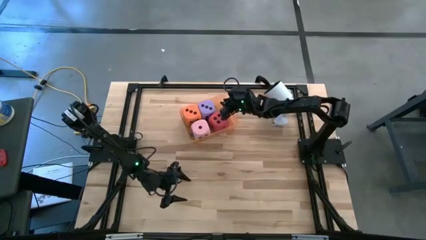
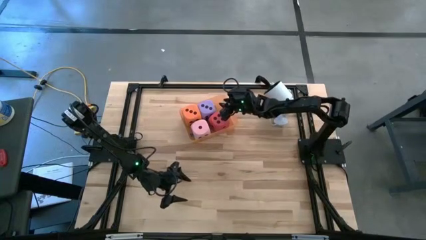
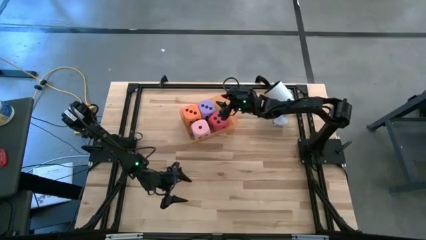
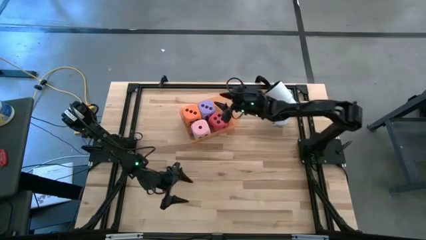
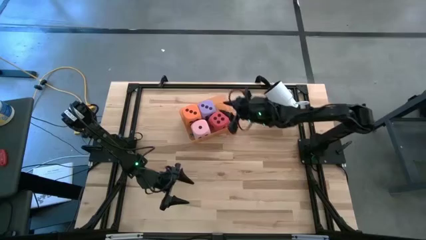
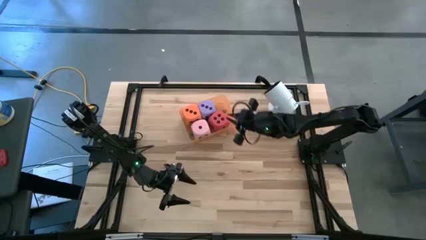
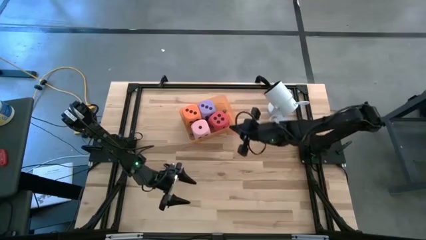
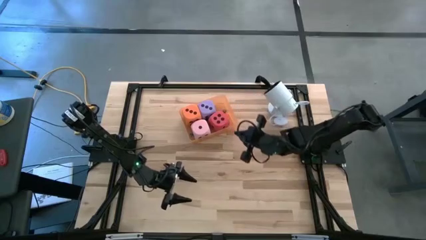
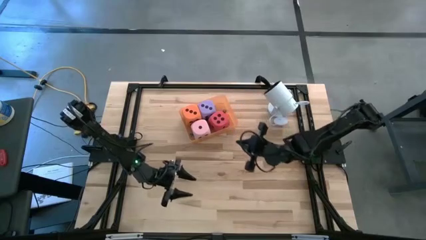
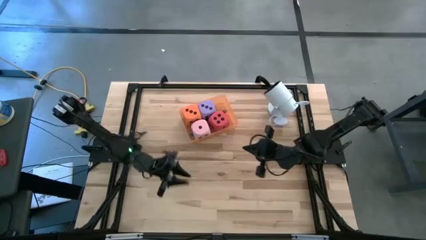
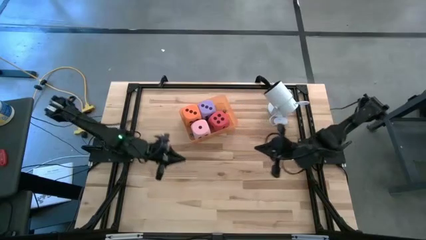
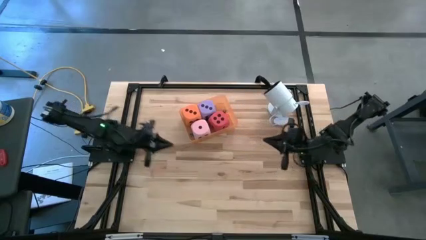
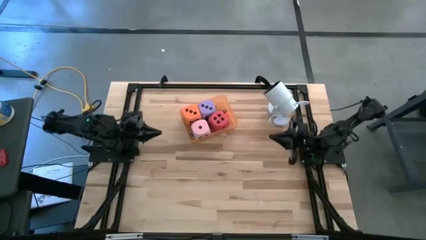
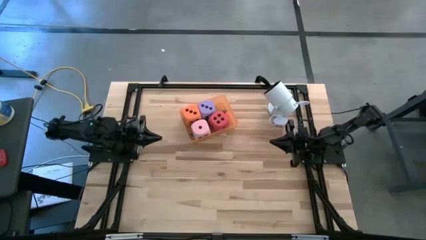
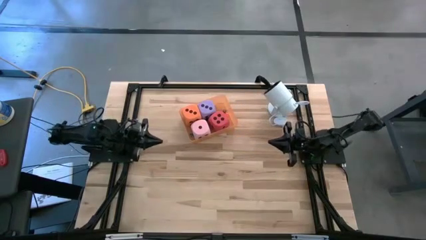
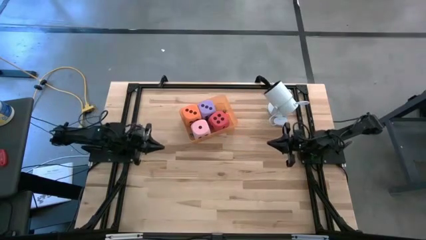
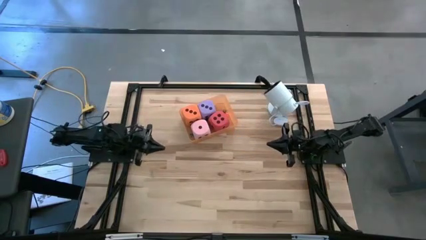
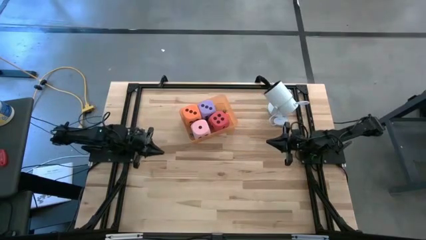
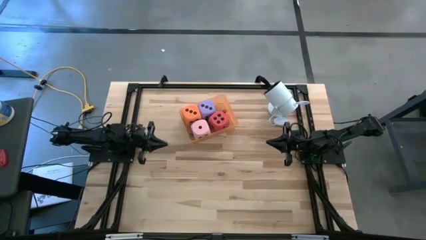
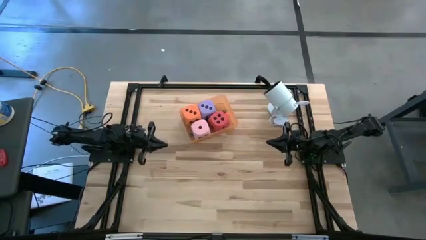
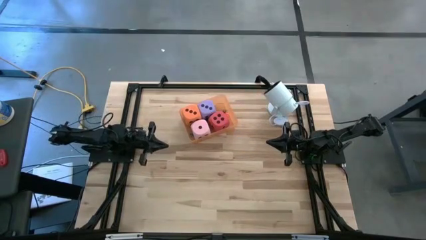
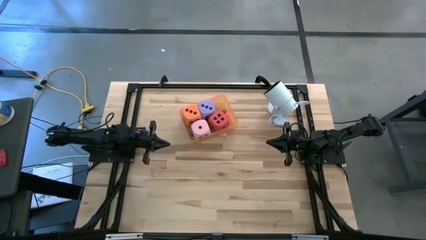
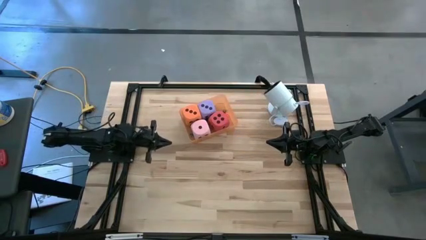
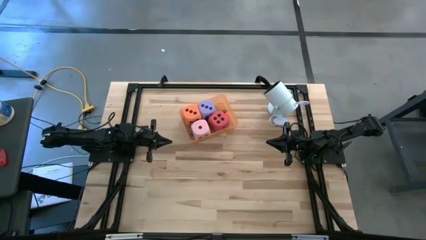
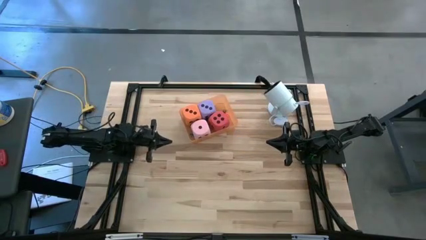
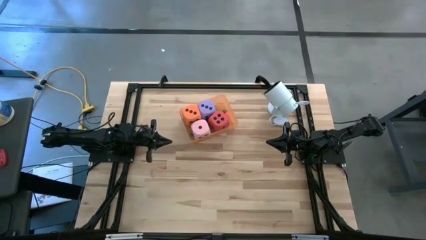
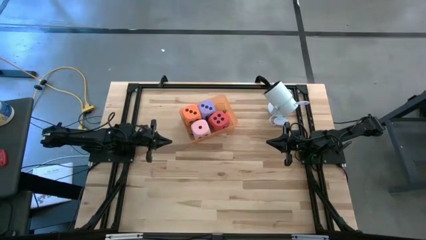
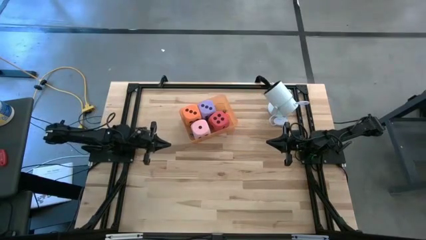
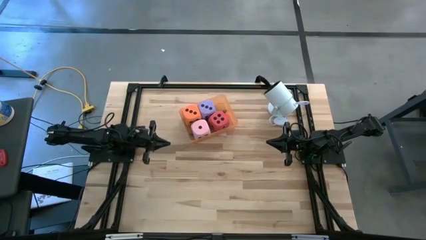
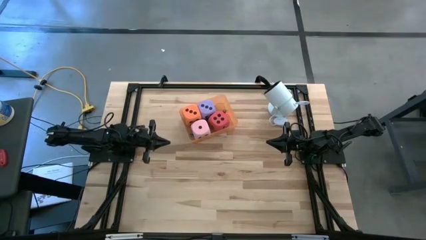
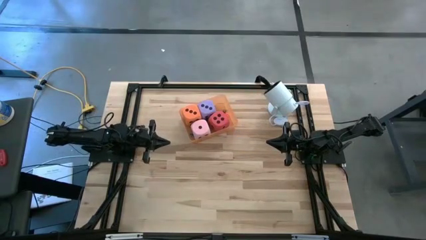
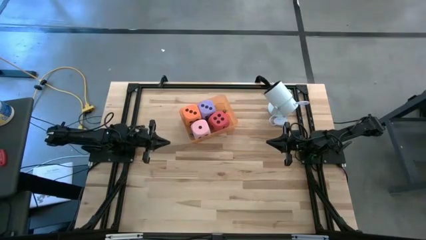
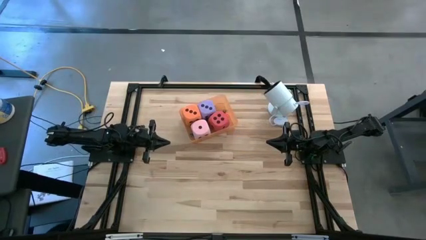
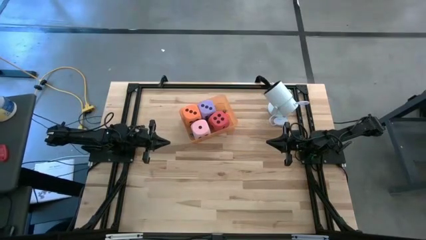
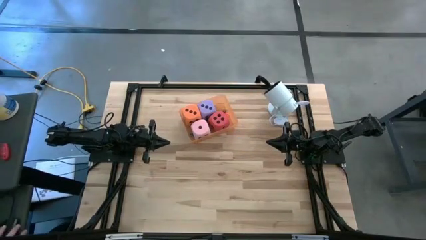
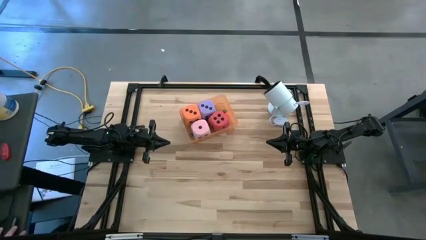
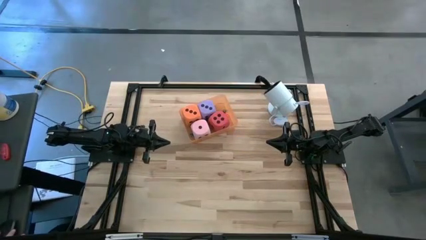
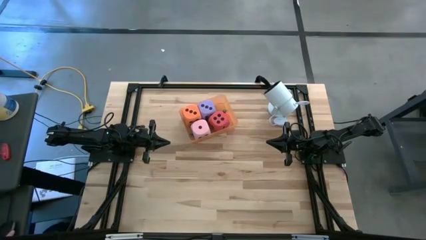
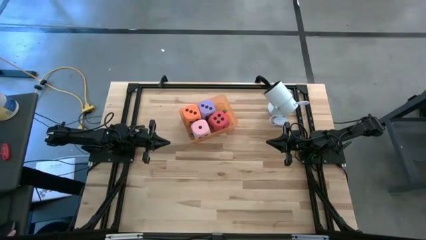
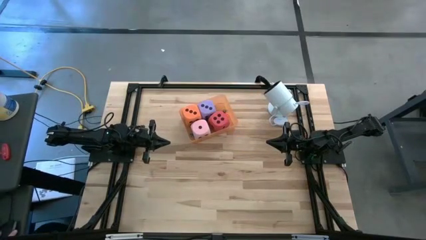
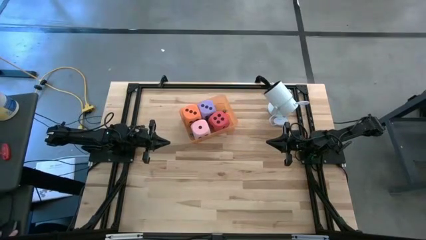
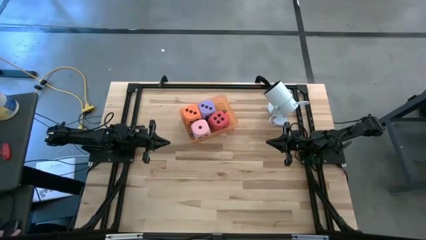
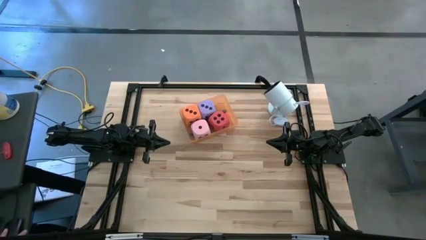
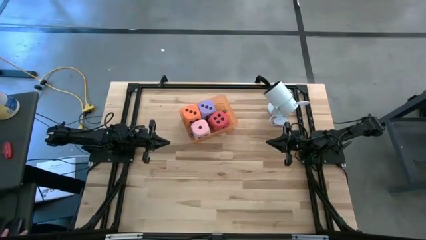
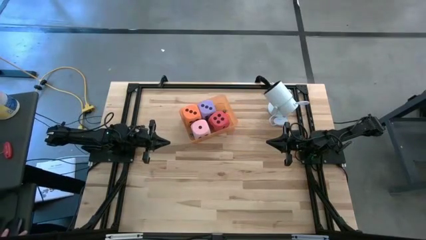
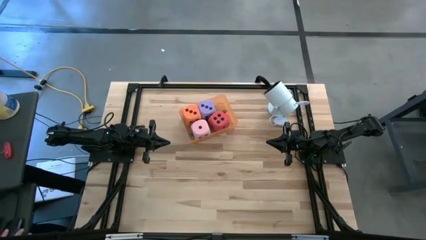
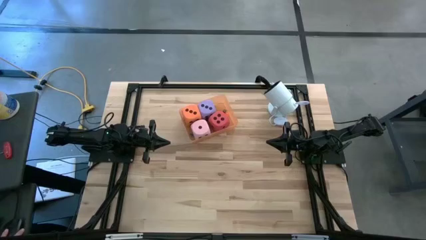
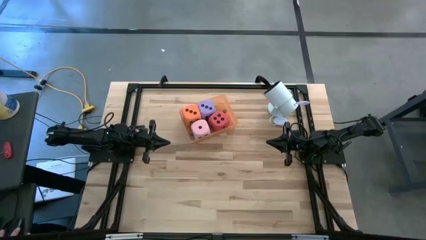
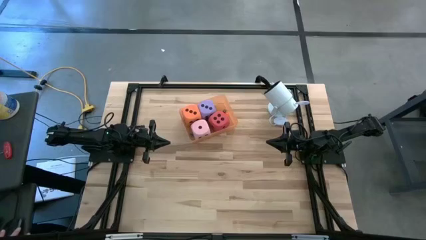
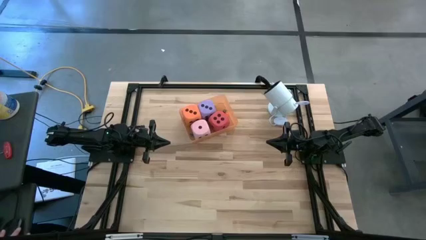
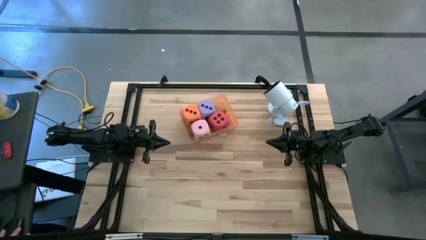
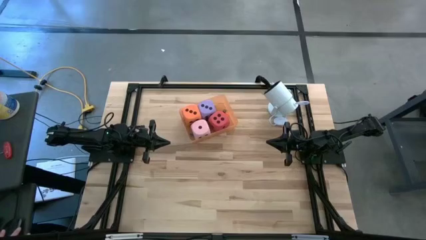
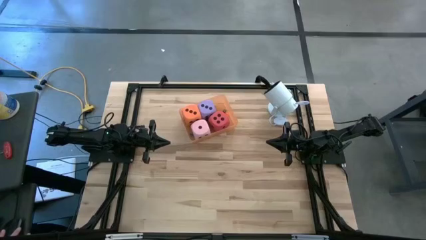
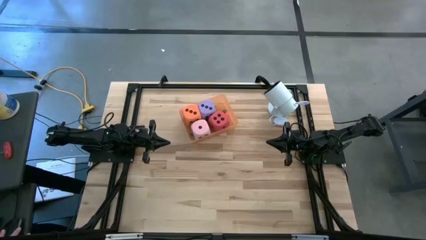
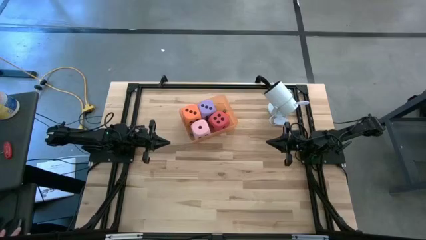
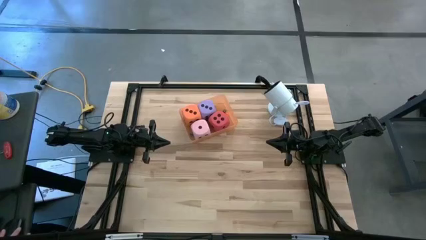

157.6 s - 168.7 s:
Task: Pick & Place Dice
Return to Home Position

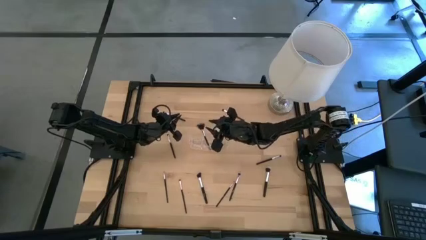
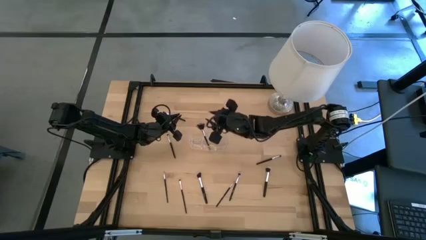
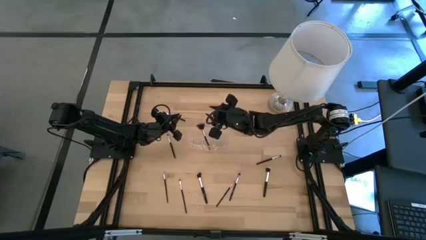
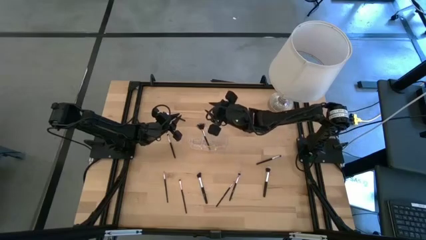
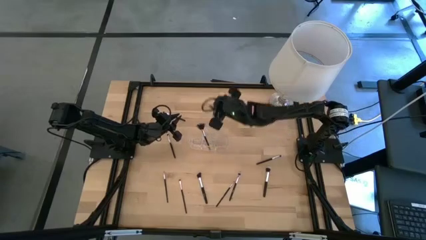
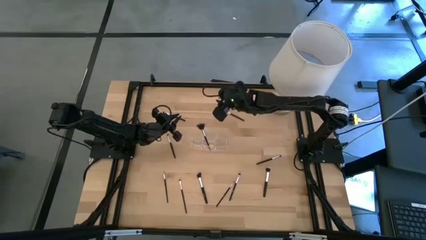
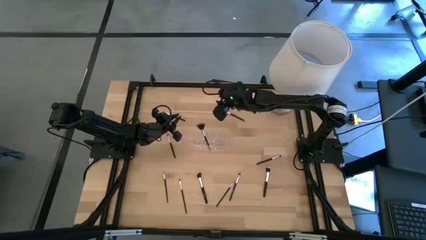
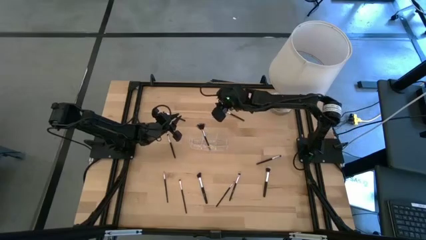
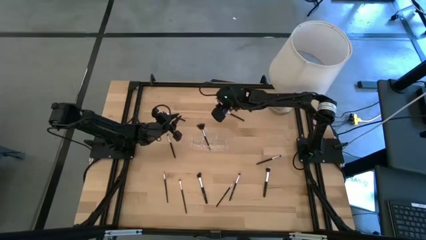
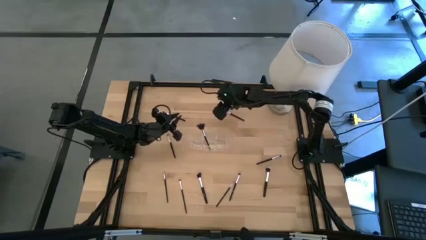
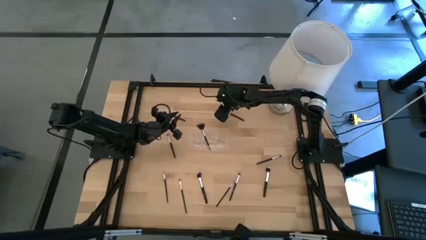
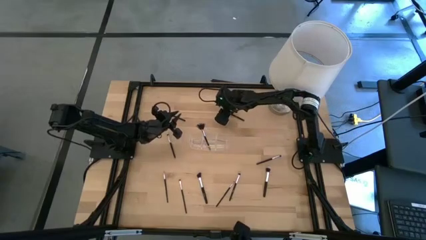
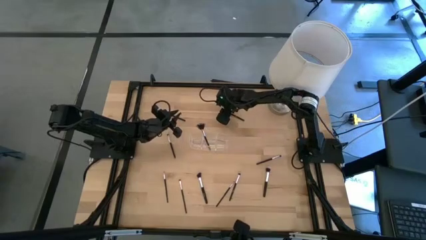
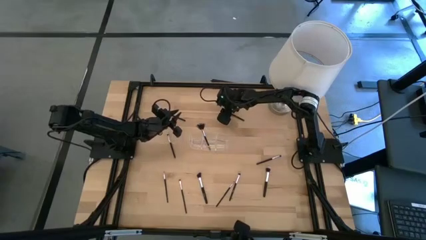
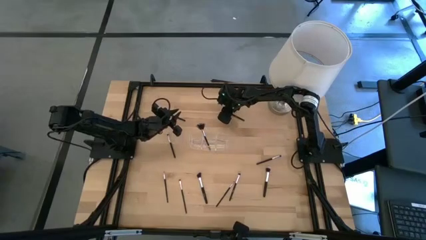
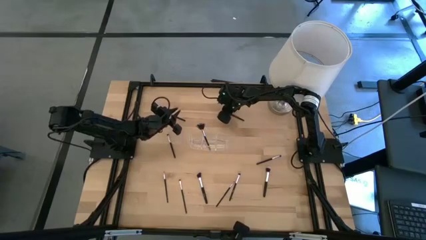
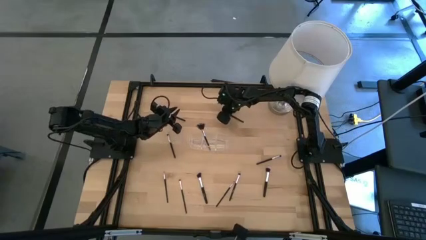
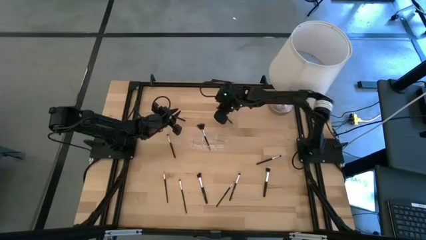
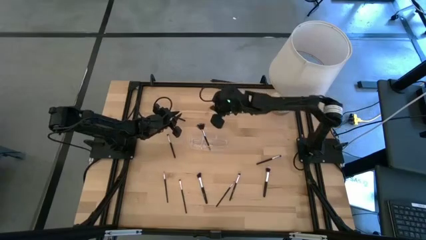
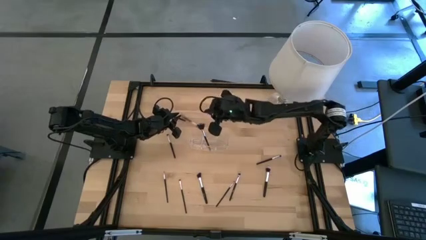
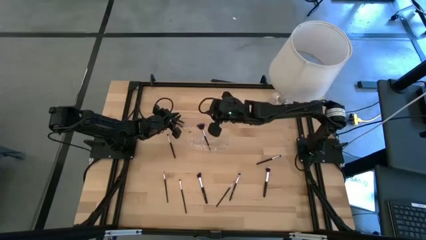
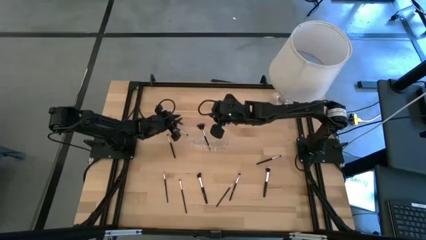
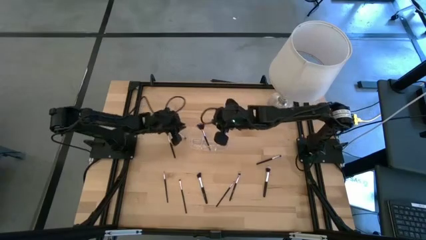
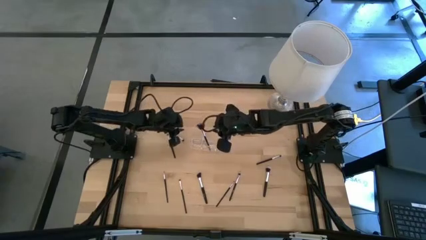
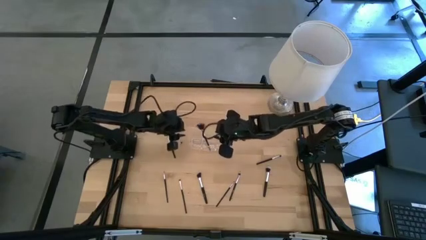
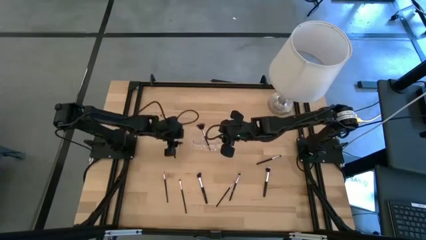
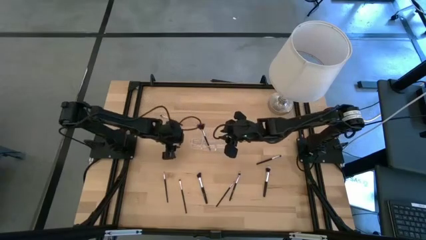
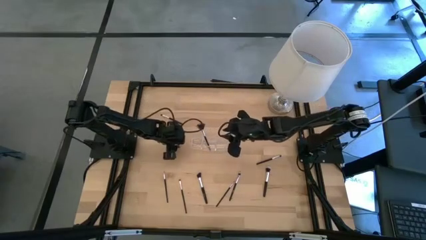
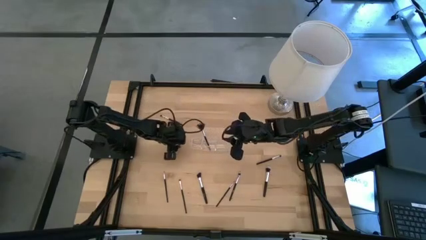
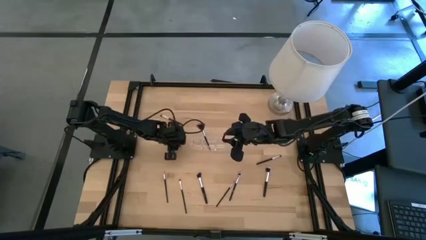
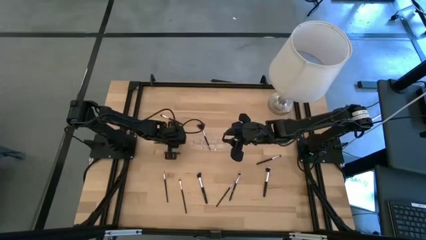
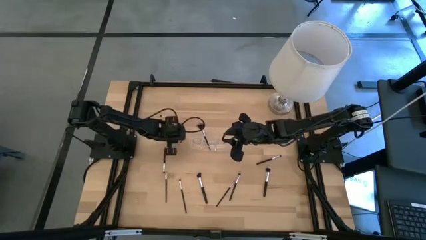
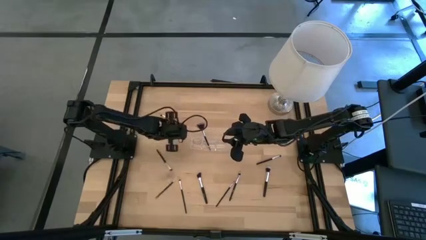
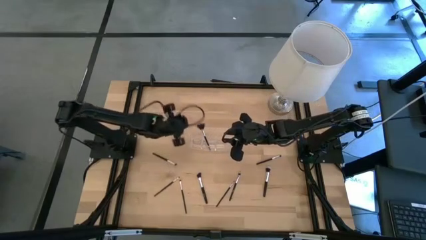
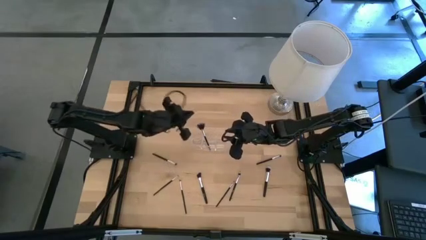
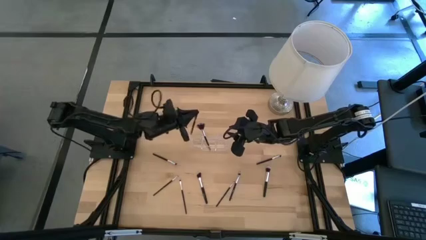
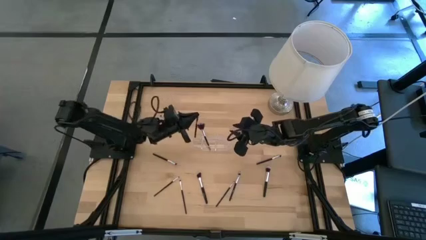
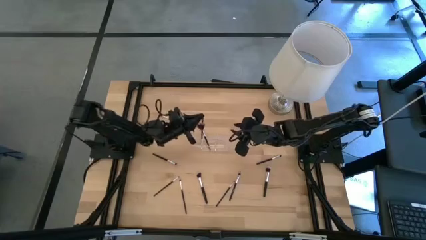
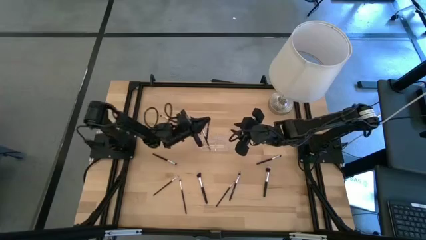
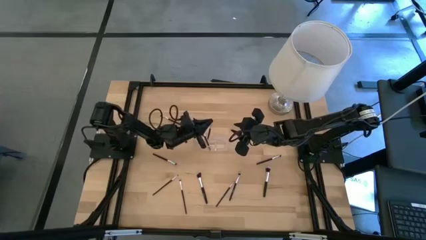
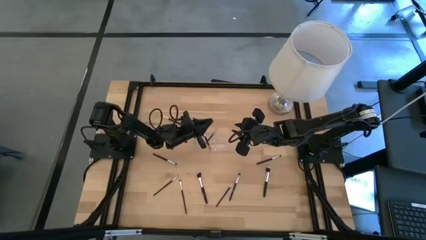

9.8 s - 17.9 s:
Task: Put items in baskets/containers
Put the eyeshadow brush into the transparent organizer
